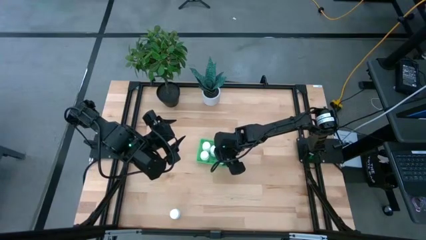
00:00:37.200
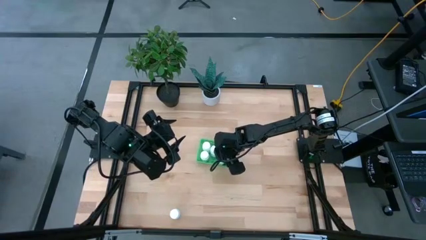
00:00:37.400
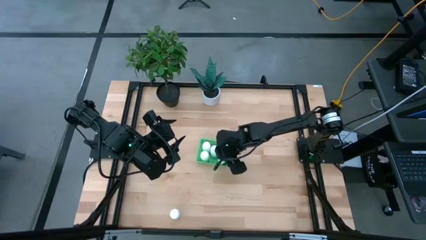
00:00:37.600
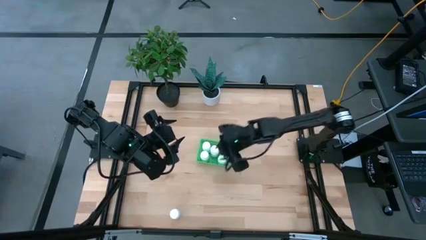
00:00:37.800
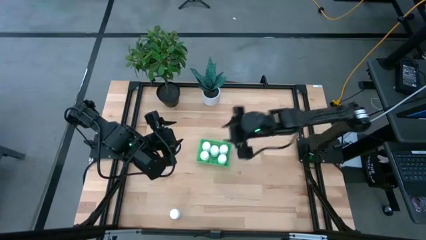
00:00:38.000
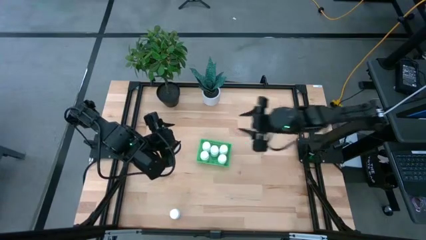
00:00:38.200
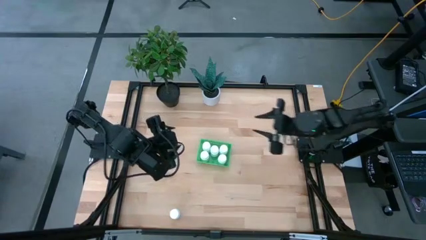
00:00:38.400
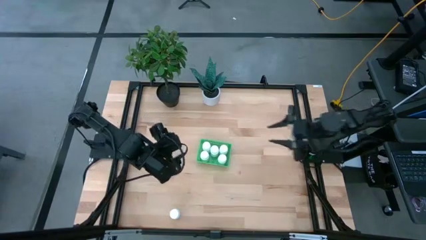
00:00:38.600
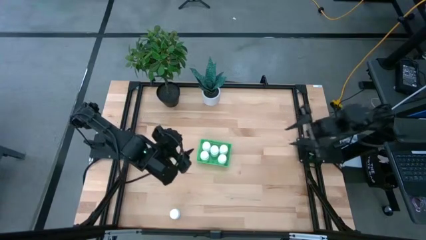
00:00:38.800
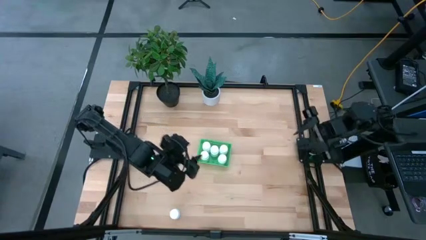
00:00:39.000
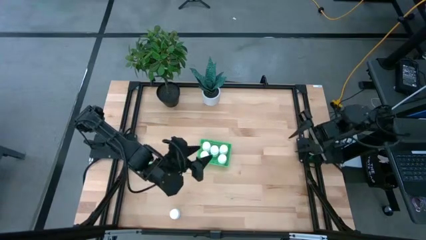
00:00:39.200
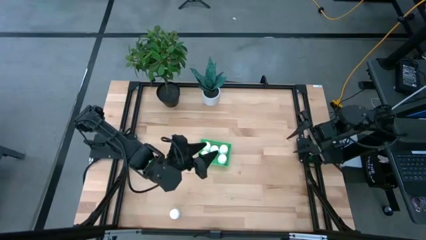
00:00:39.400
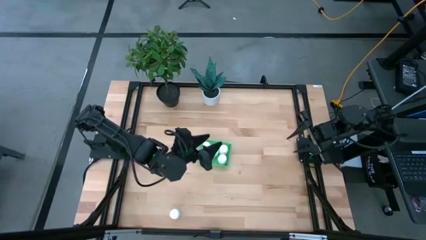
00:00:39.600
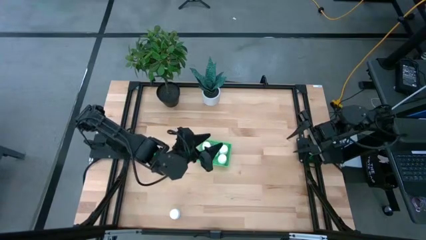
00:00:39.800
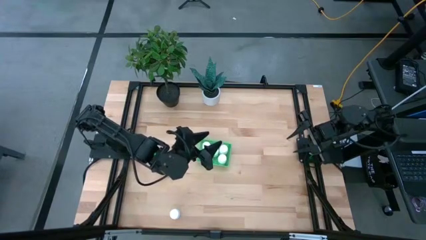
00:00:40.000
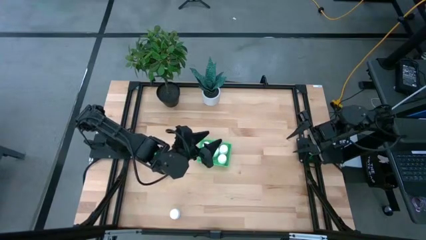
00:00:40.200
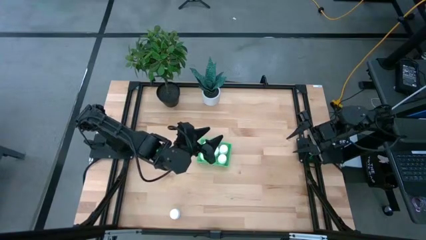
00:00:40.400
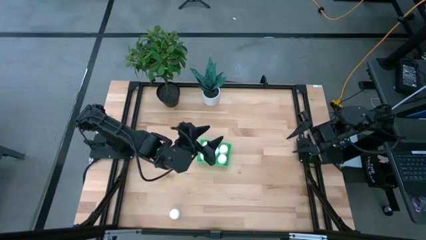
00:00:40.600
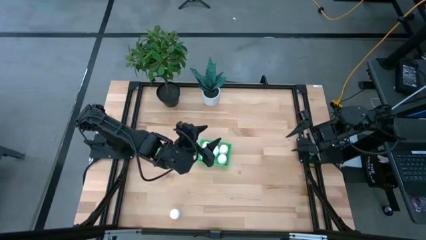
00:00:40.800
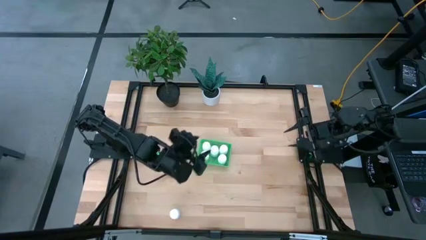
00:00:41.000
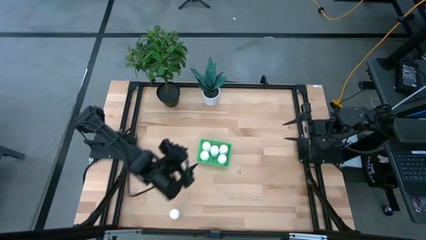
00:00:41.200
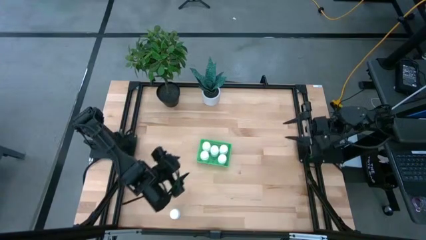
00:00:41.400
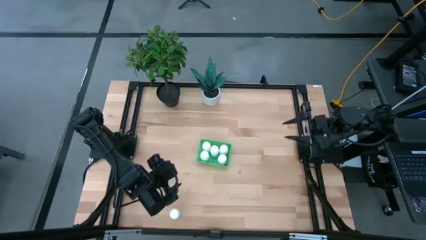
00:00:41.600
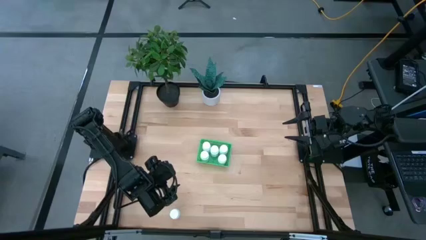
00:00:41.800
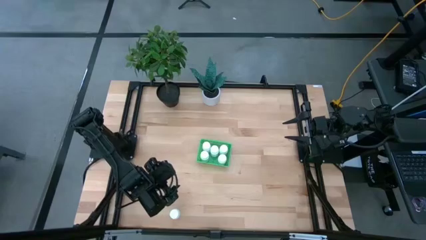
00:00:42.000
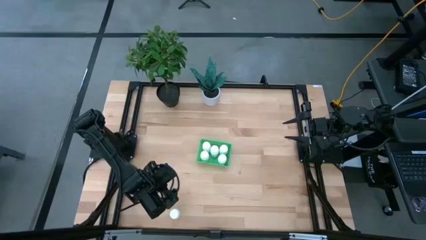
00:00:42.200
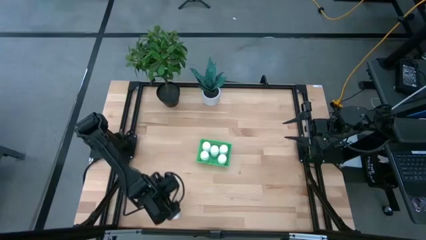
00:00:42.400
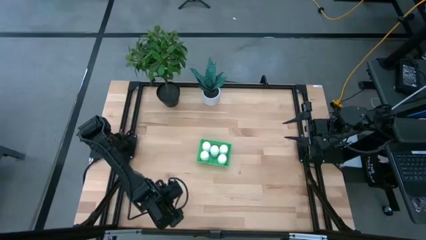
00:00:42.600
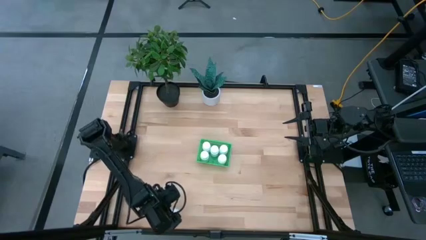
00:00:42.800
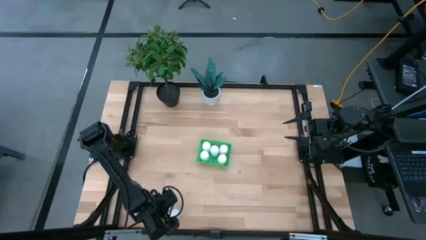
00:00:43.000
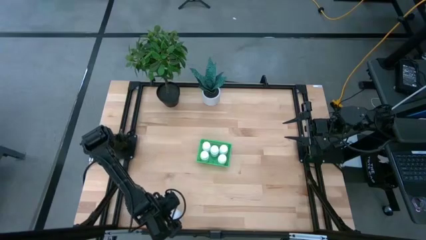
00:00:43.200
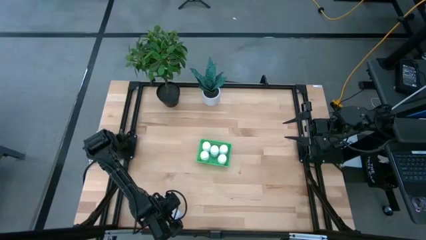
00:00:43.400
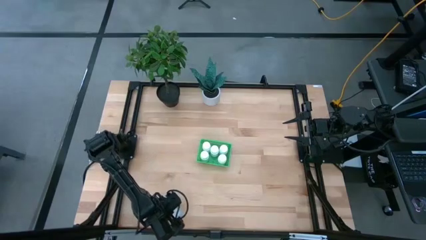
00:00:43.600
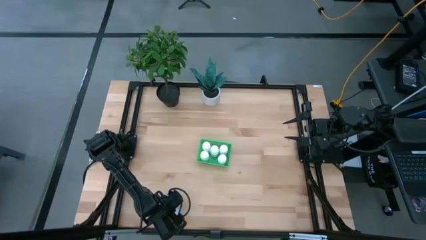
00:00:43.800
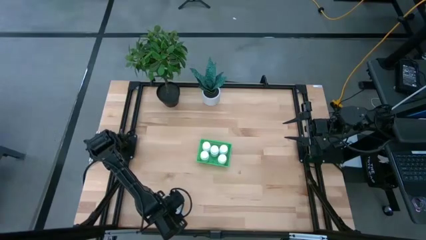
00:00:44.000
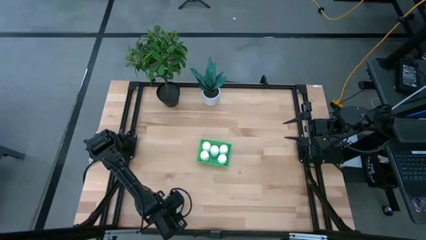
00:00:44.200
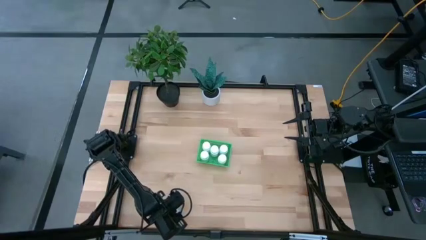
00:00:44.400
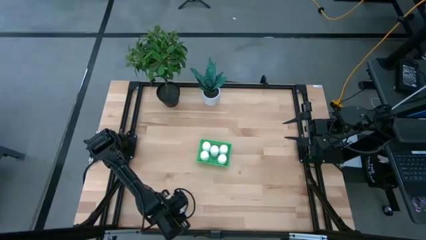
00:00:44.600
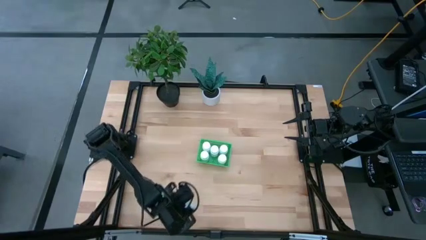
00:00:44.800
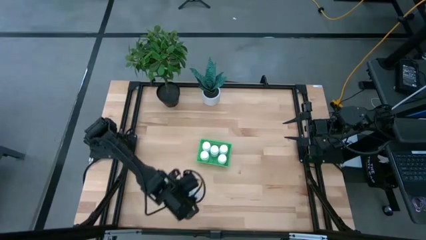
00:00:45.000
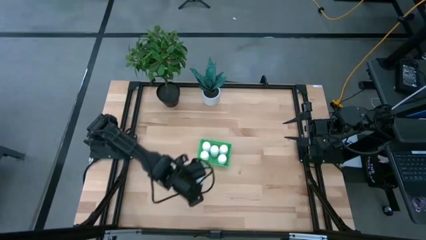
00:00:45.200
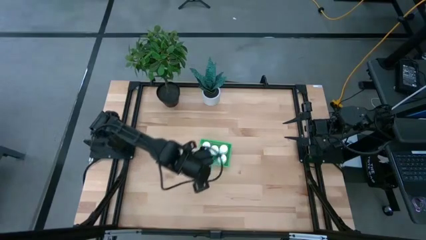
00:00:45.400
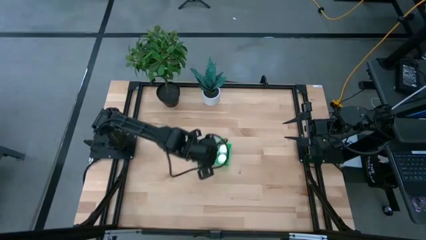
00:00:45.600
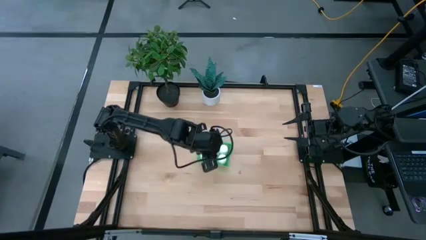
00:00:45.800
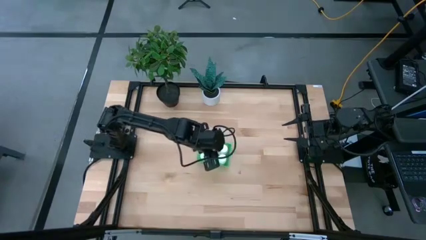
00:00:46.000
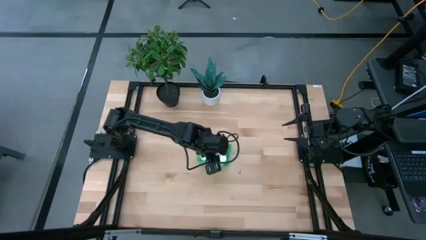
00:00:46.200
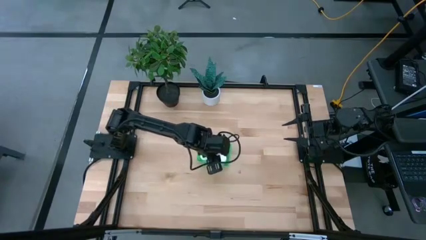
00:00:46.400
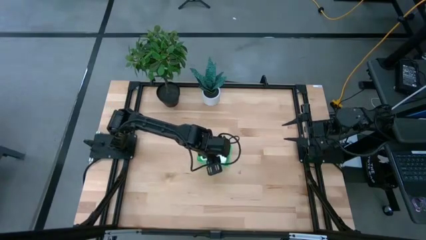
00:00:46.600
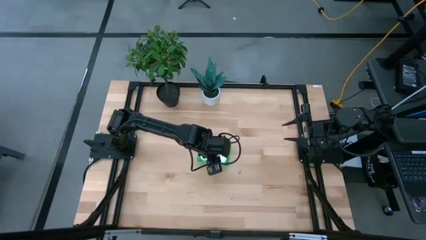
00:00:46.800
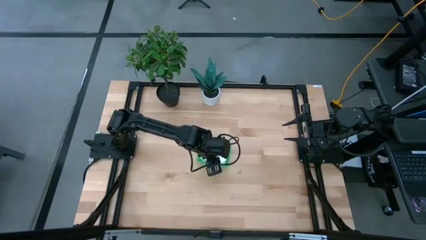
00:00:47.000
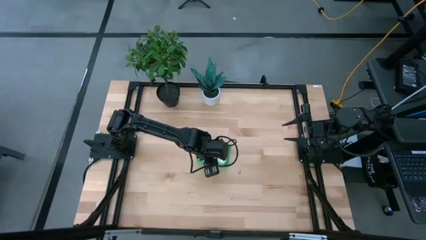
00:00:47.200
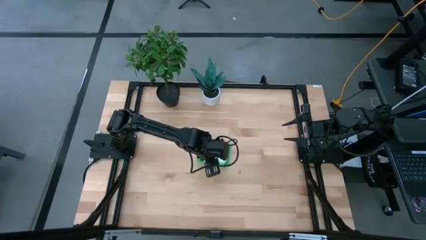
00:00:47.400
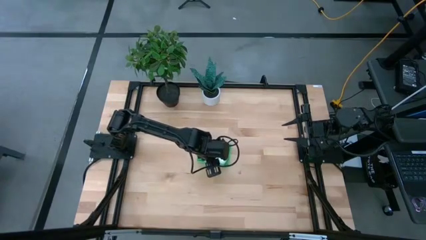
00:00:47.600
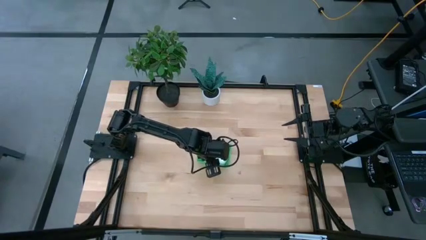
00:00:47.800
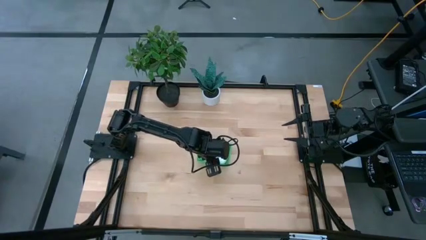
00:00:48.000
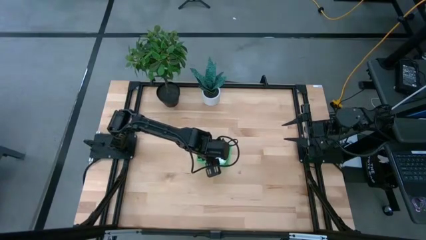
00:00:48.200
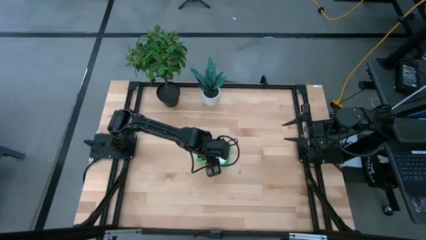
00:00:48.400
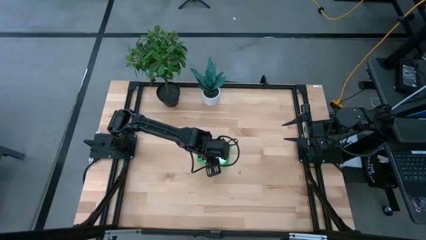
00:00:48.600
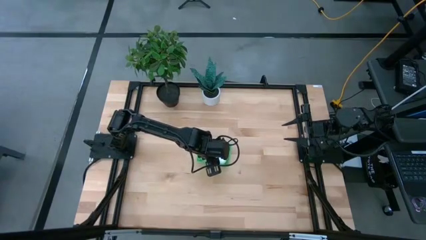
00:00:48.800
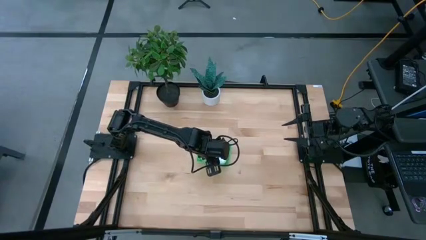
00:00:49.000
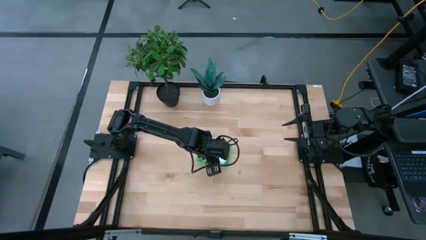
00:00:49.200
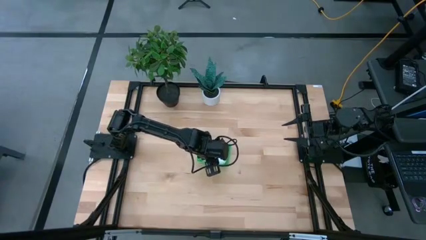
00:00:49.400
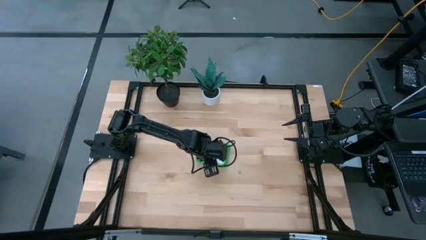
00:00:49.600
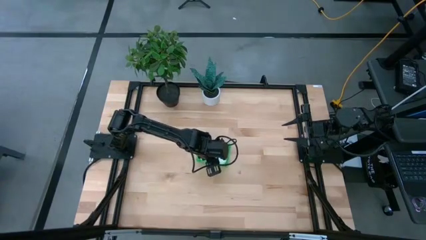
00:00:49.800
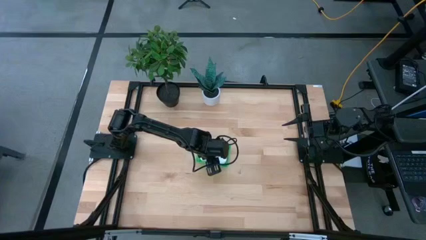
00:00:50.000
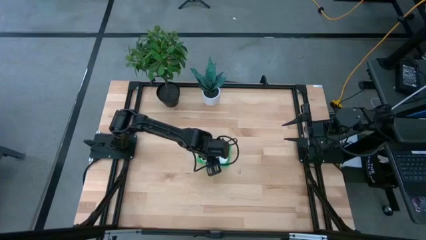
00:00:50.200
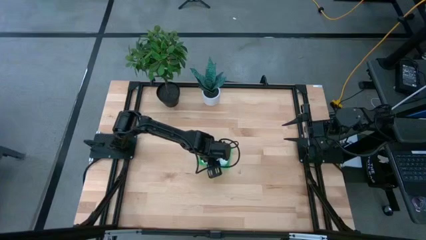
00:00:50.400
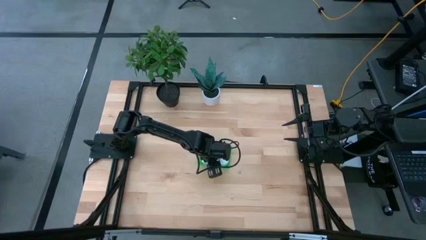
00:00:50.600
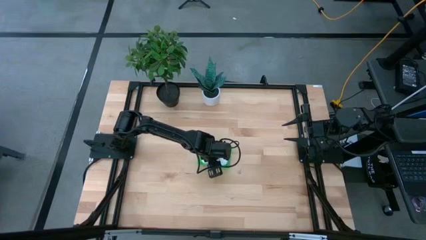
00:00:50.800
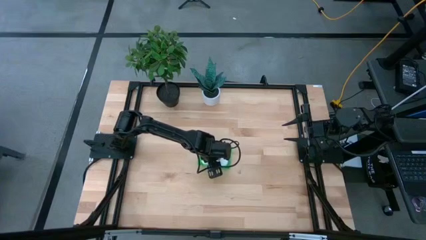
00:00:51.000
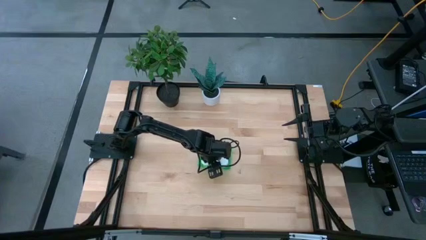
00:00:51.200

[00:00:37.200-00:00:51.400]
Task: Pick and place pill bottles into a basket
Put the pill bottle into the bin
